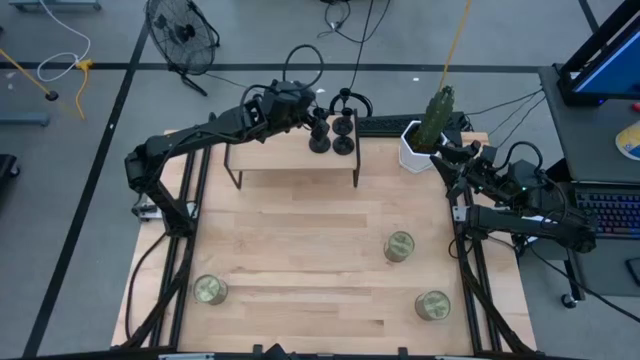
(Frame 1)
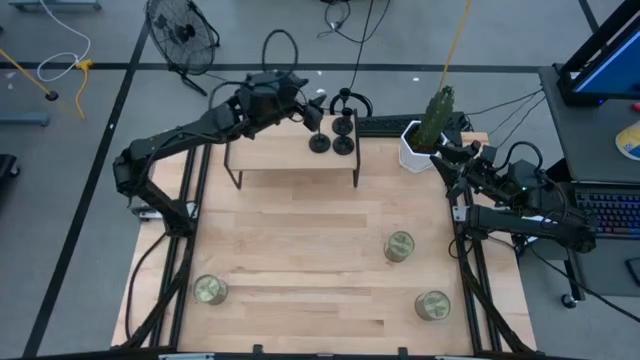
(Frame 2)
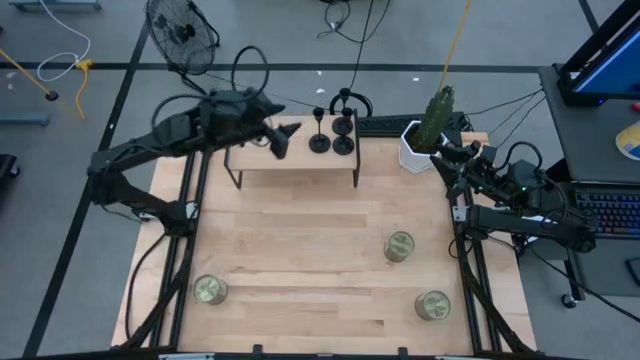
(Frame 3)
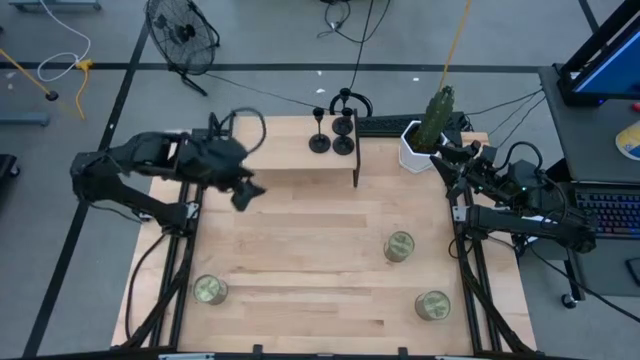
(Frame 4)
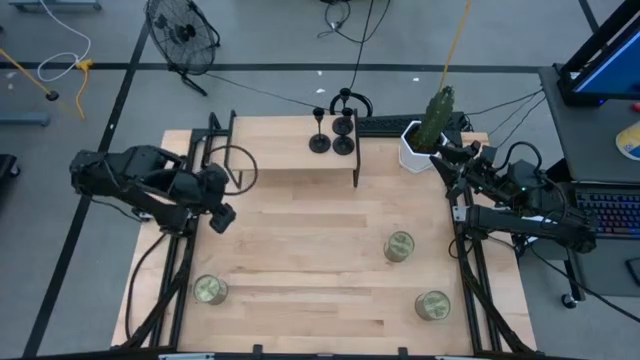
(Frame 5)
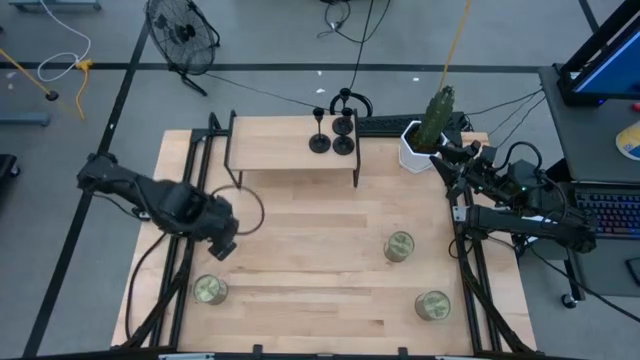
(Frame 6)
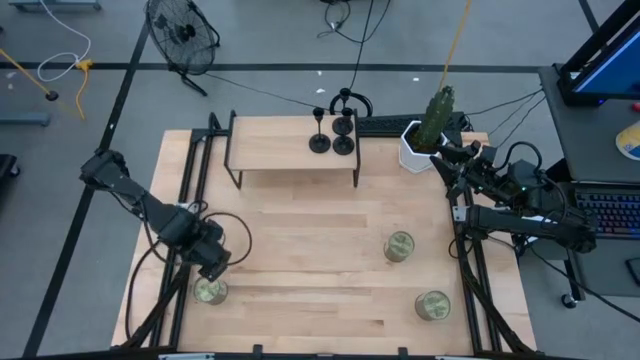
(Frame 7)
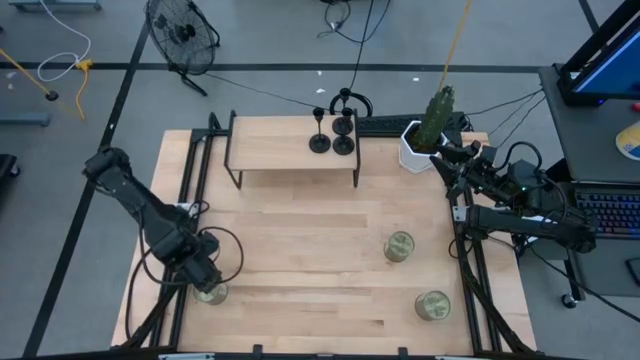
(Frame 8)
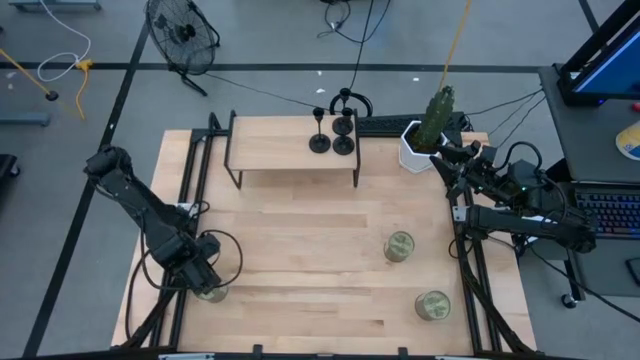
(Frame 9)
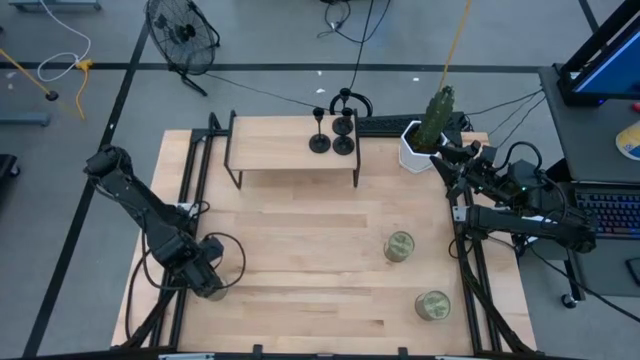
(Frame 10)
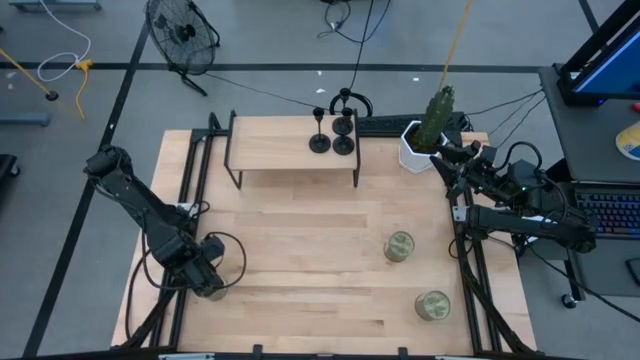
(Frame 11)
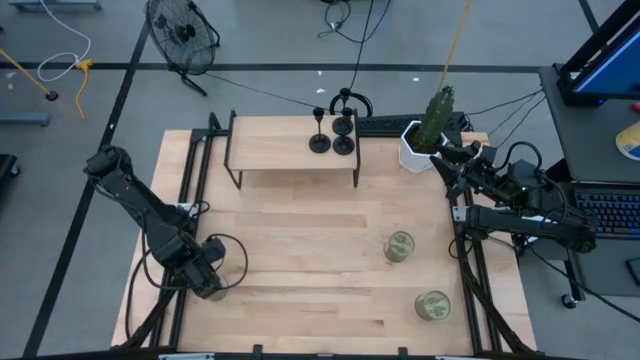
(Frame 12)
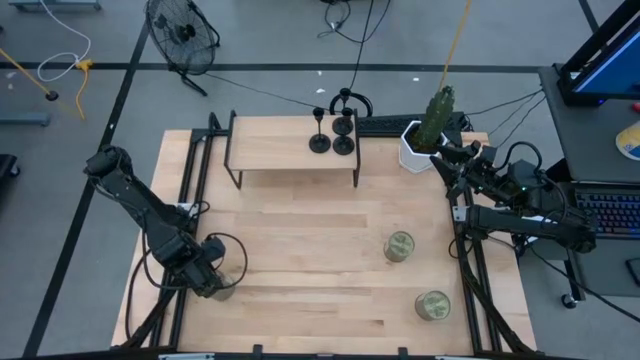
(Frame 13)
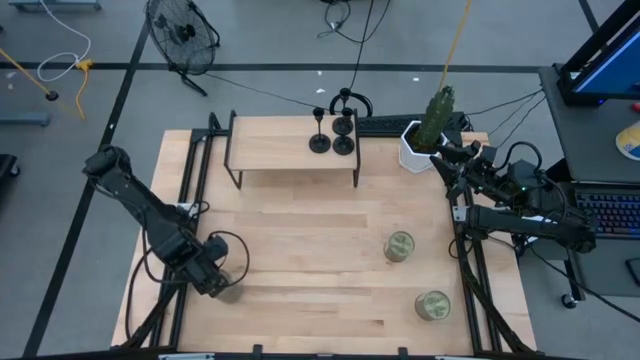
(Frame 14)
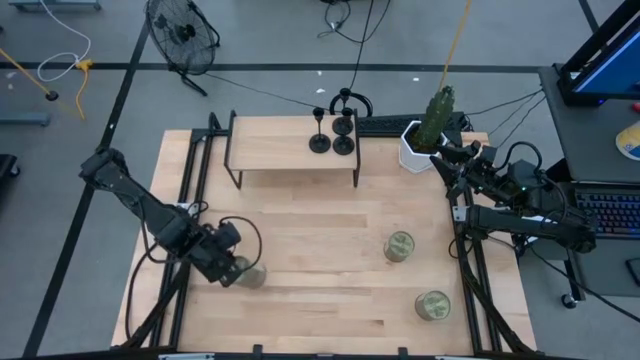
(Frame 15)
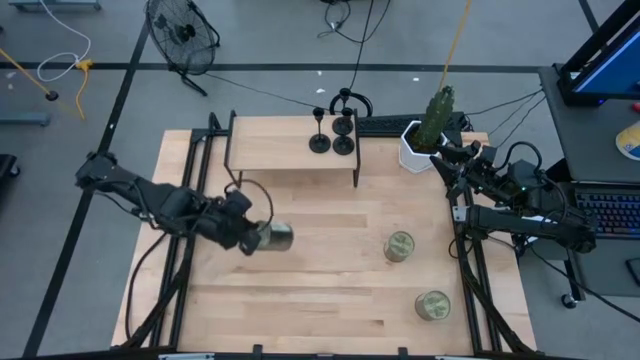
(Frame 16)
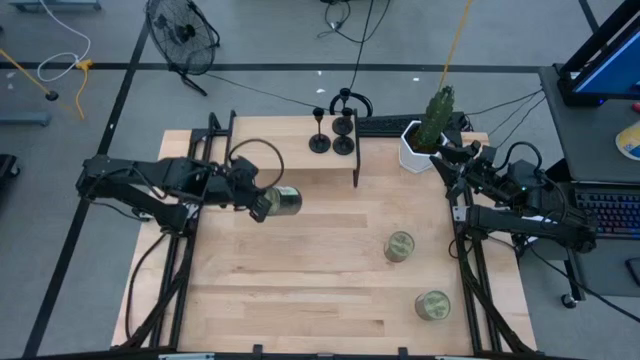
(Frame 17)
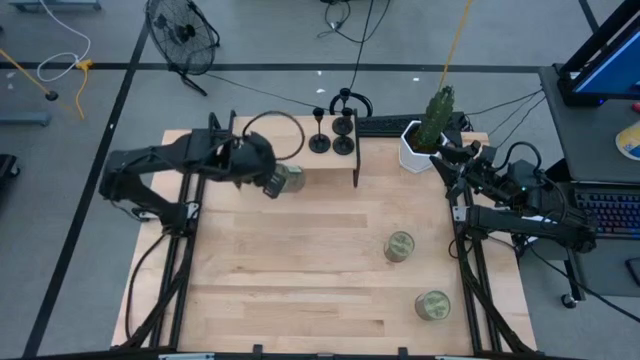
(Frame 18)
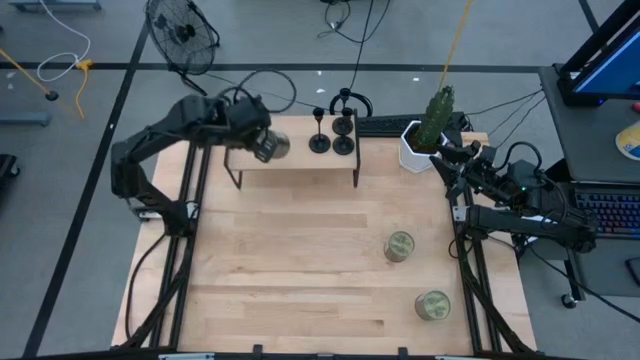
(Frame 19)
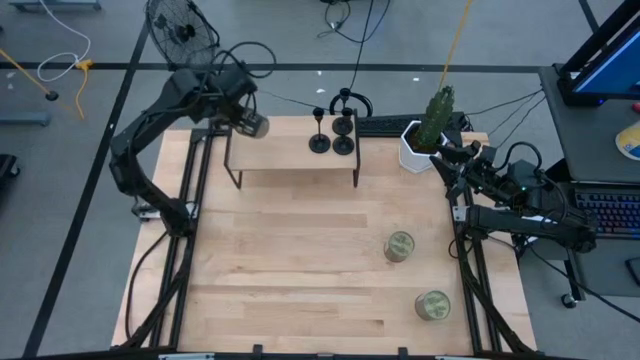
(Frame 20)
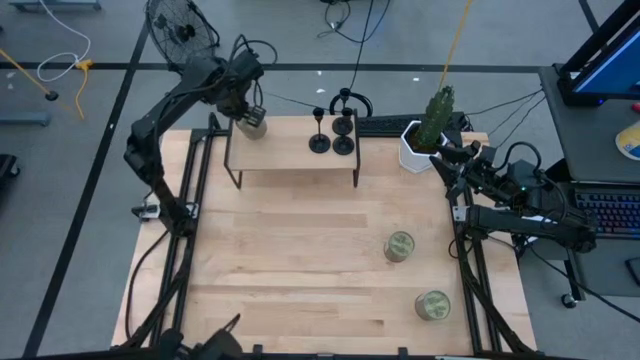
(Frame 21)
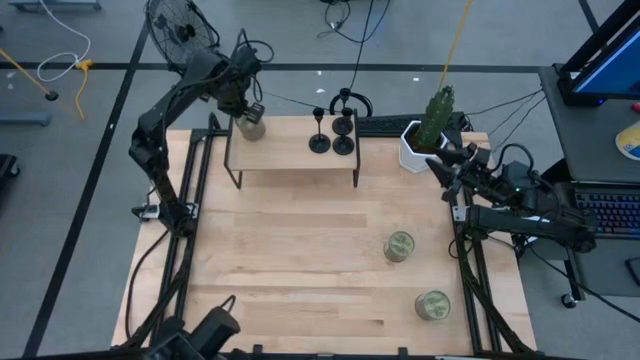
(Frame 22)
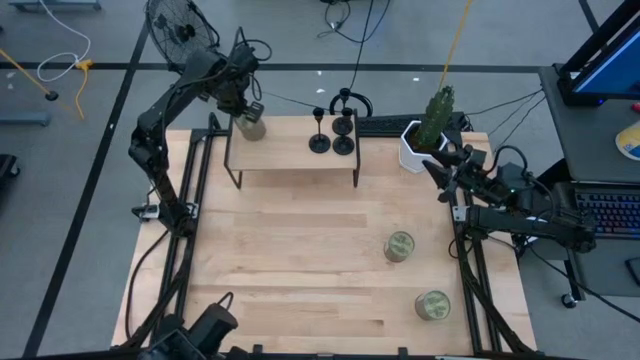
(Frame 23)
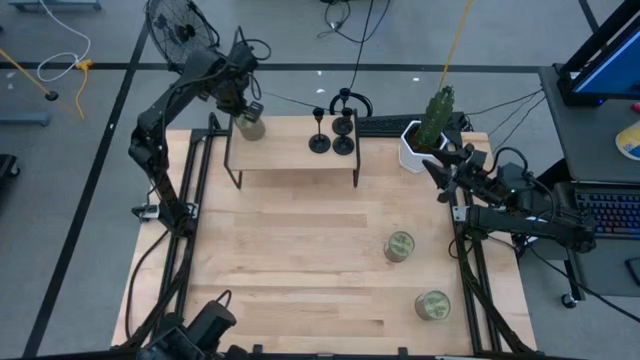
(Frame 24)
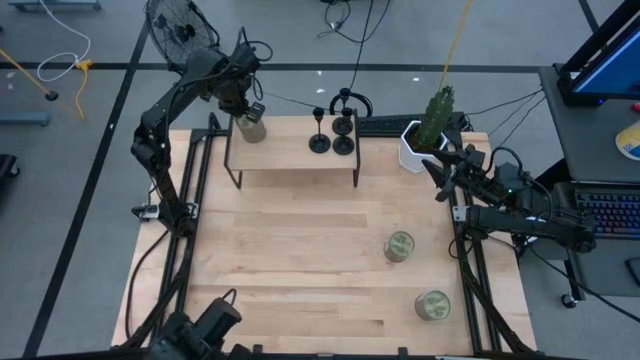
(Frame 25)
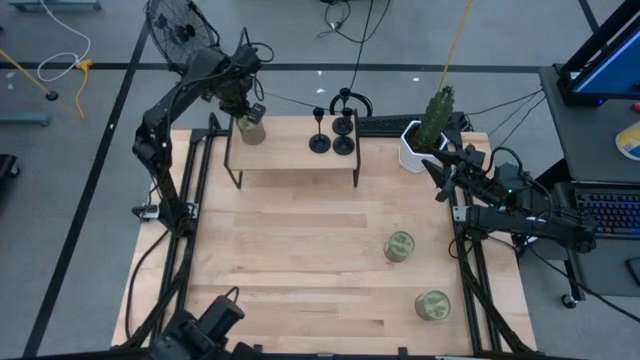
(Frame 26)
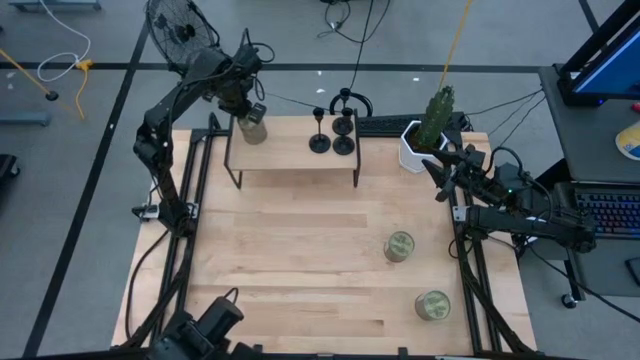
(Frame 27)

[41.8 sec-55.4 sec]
Task: Pick & Place candle stick holders
Put the left scented candle on the shelf

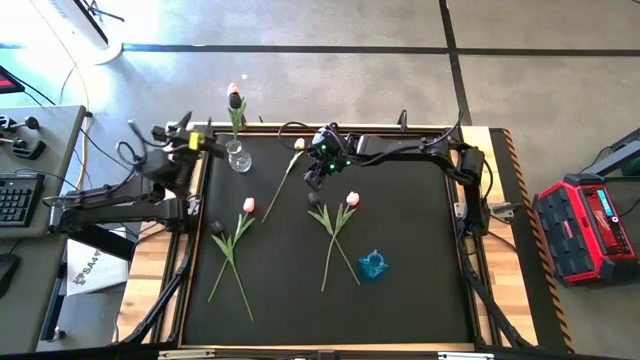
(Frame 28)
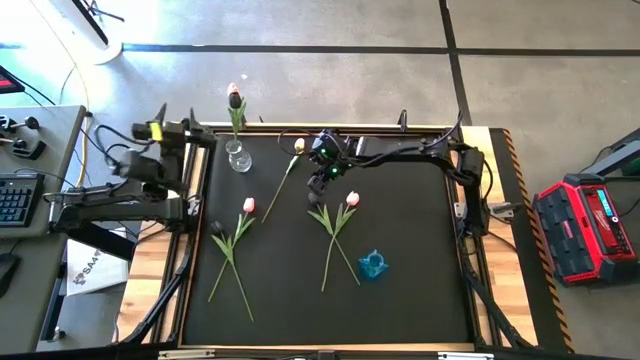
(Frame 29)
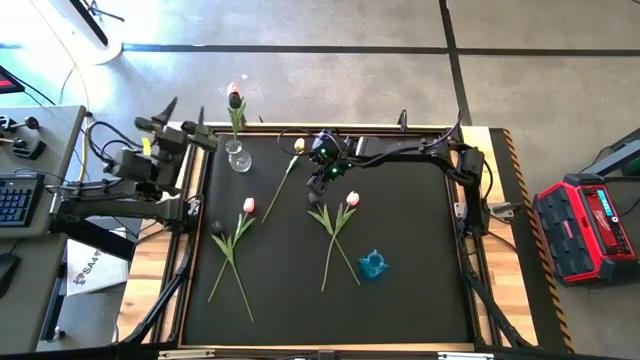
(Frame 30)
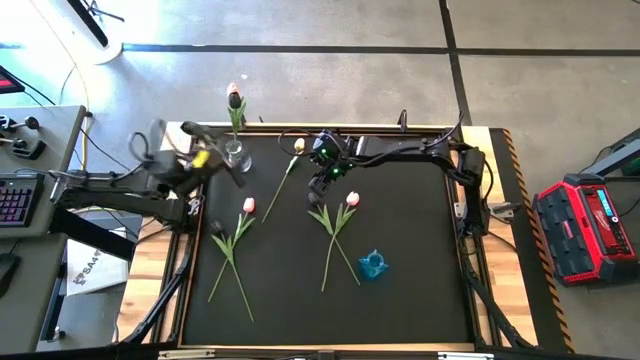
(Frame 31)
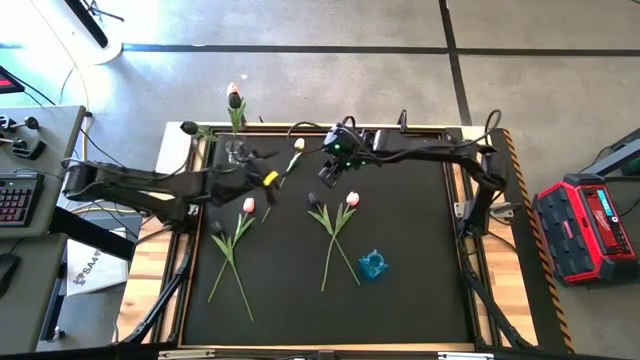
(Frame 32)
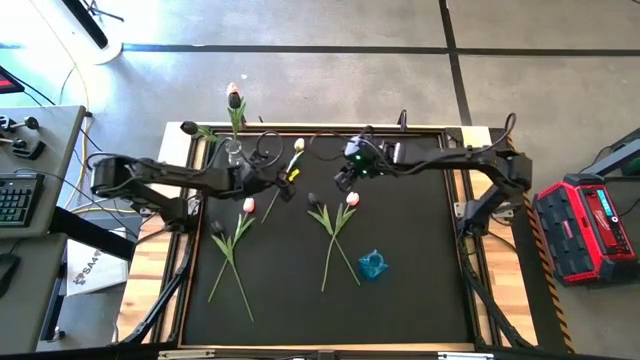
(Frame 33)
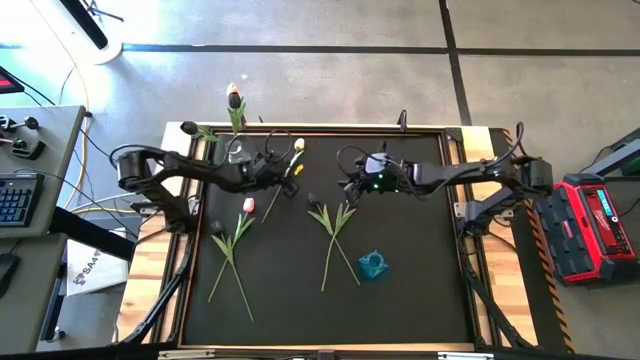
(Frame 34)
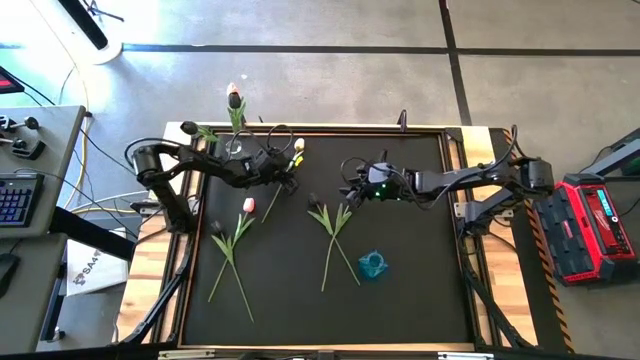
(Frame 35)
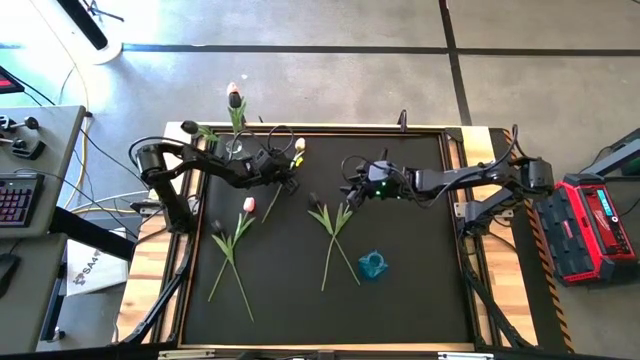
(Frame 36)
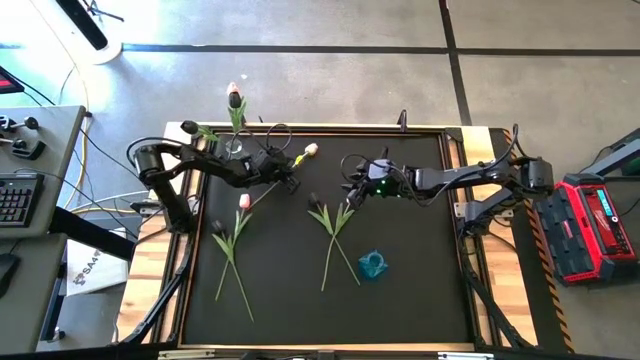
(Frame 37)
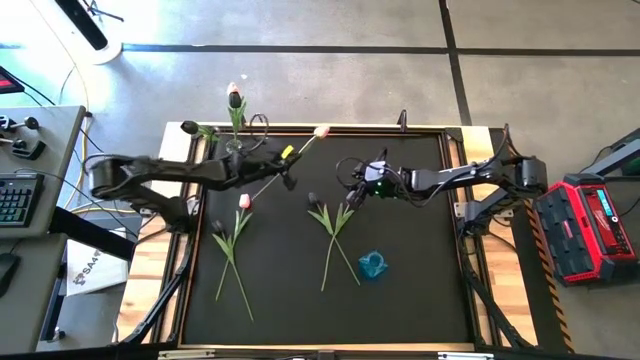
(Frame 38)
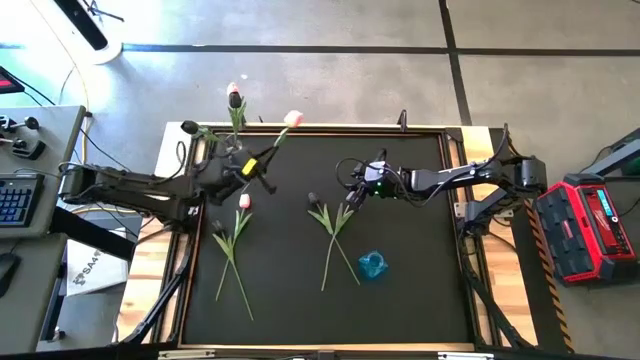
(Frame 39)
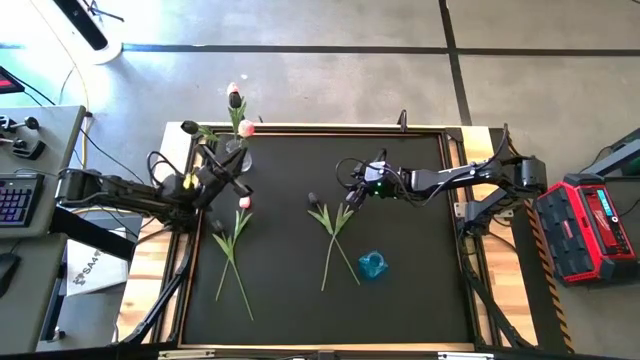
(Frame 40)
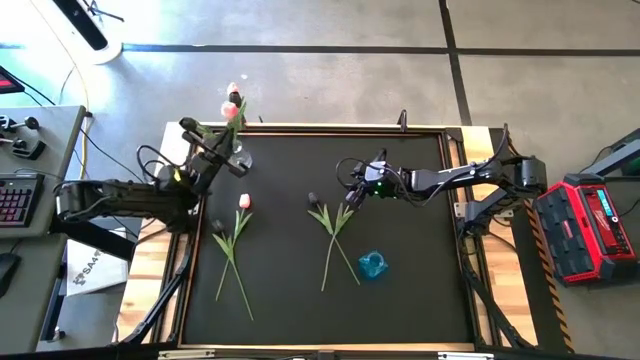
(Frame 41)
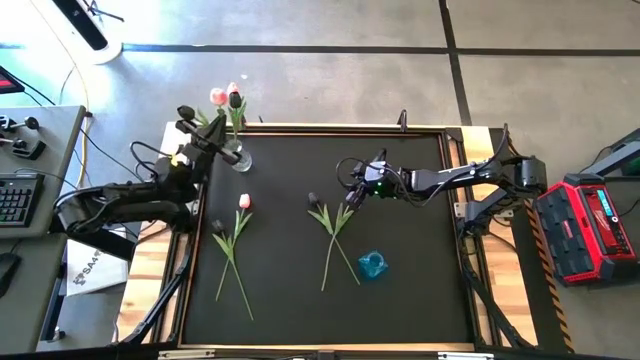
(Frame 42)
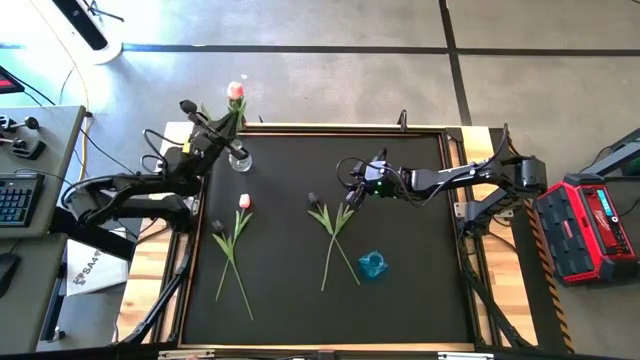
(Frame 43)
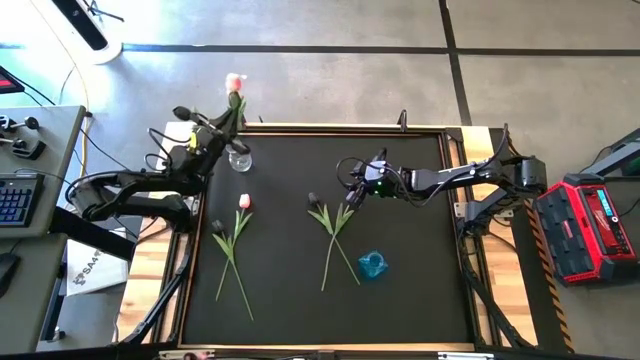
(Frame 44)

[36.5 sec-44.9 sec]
Task: Sort flowers into vase by color
Put the middle top pink flower into the transparent vase
